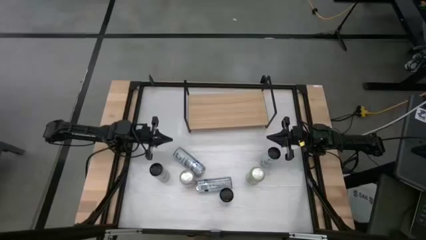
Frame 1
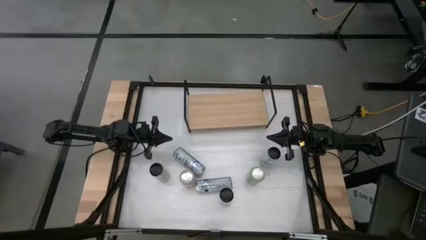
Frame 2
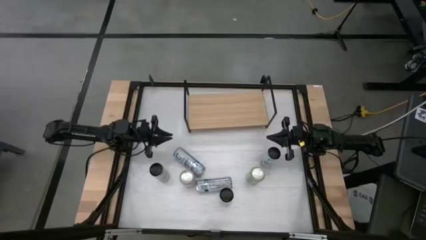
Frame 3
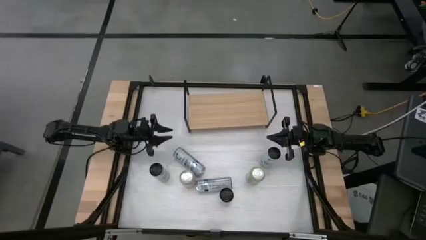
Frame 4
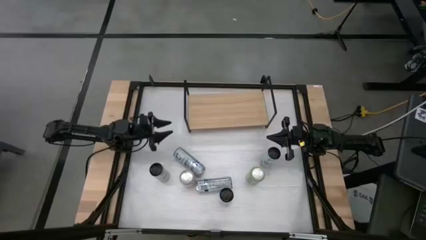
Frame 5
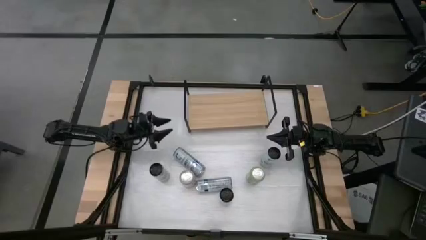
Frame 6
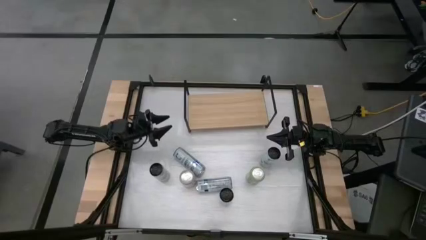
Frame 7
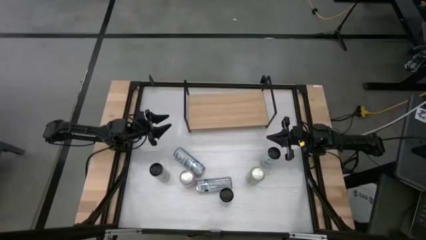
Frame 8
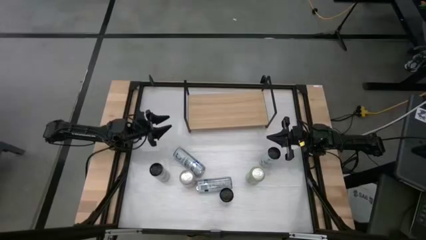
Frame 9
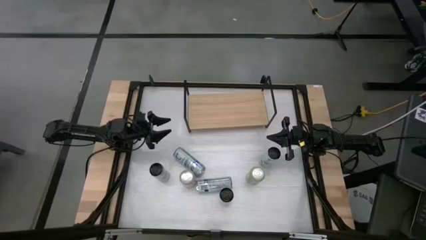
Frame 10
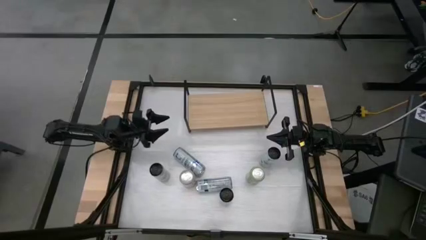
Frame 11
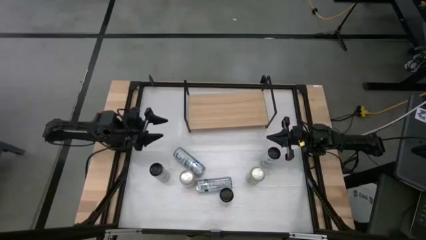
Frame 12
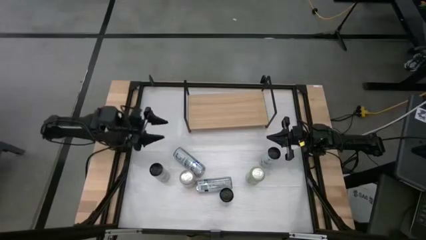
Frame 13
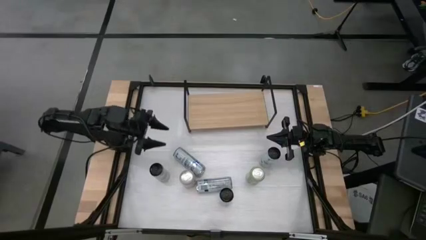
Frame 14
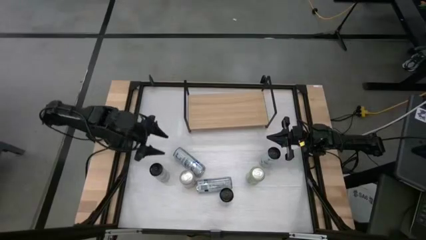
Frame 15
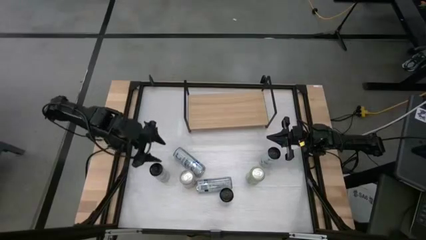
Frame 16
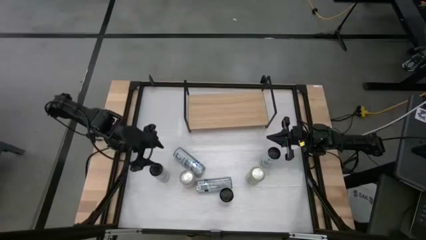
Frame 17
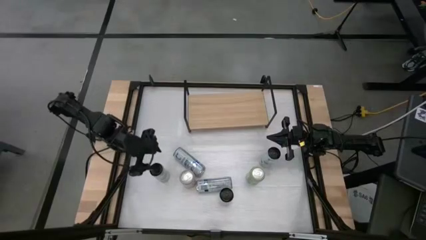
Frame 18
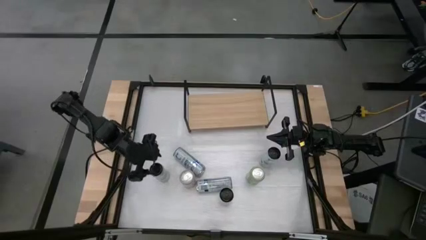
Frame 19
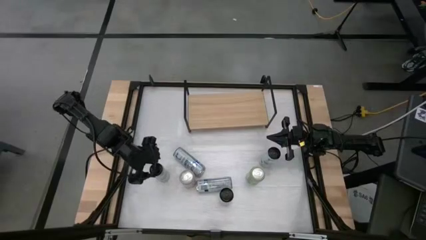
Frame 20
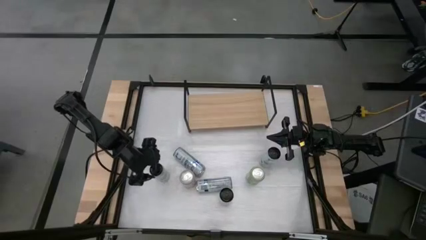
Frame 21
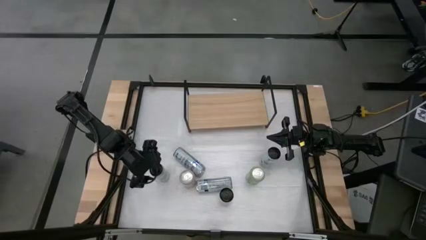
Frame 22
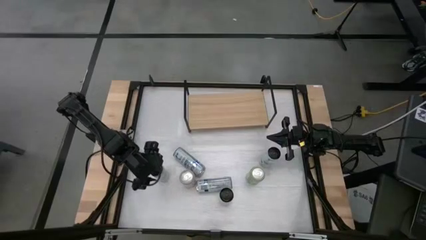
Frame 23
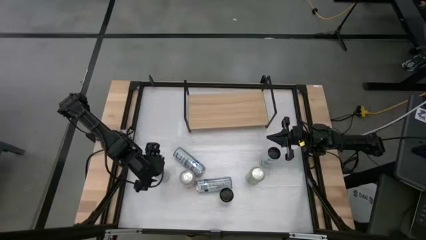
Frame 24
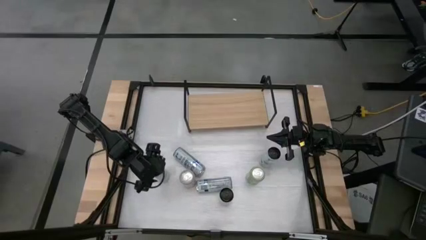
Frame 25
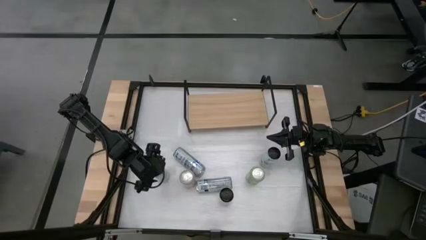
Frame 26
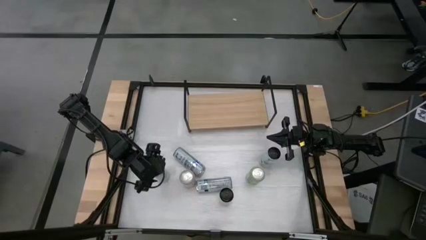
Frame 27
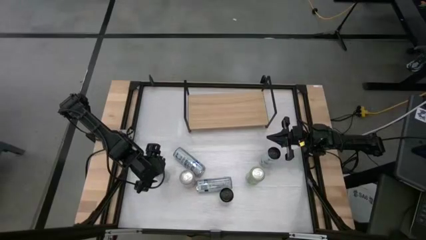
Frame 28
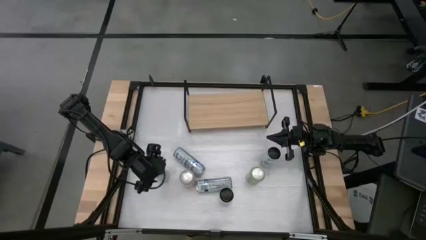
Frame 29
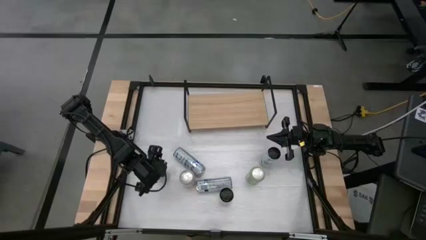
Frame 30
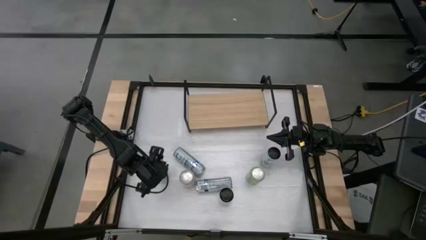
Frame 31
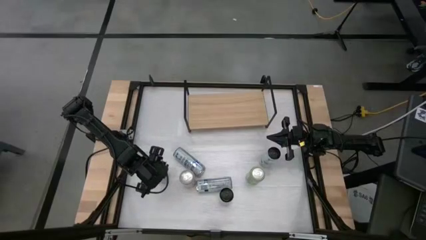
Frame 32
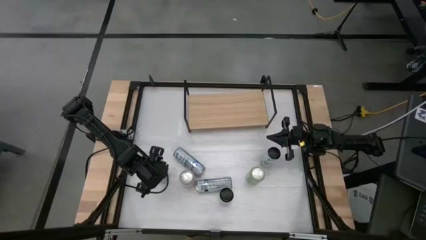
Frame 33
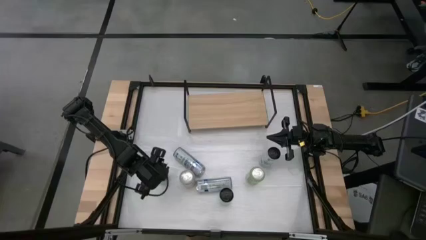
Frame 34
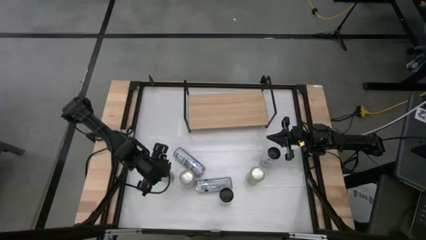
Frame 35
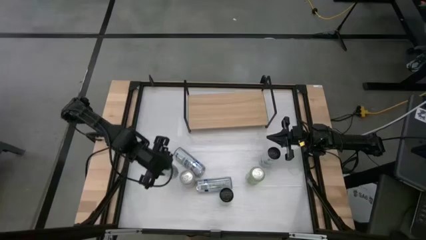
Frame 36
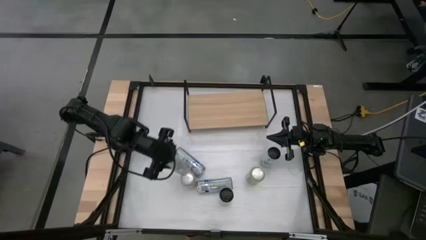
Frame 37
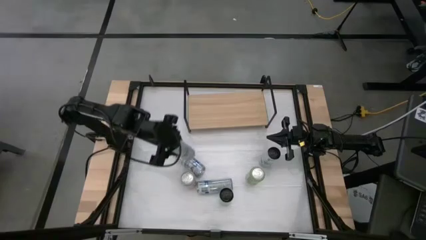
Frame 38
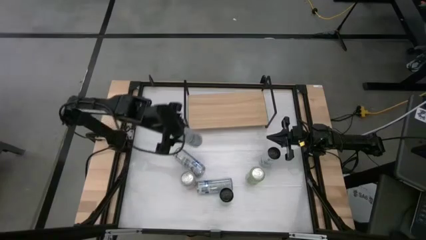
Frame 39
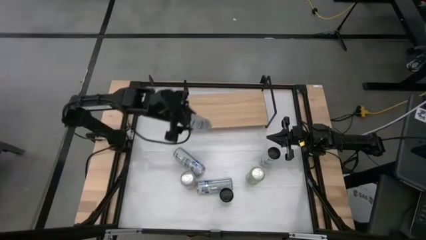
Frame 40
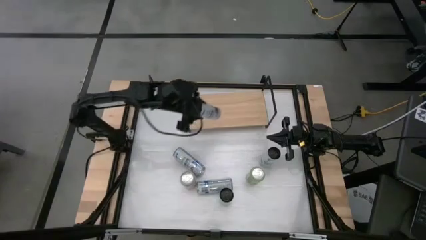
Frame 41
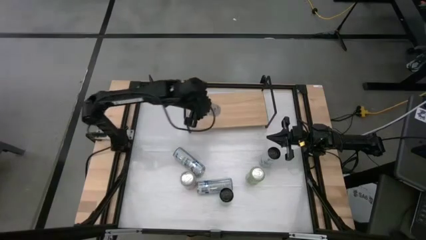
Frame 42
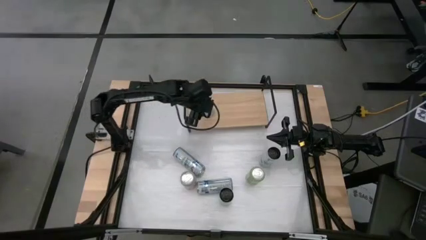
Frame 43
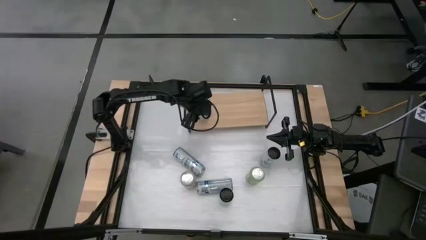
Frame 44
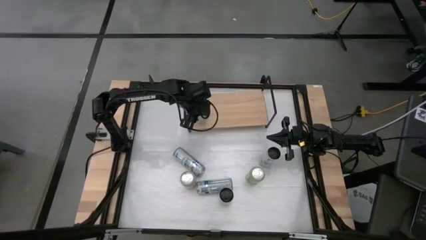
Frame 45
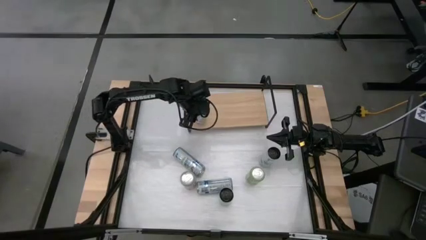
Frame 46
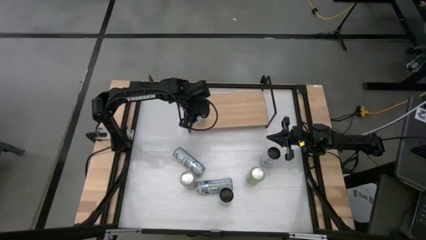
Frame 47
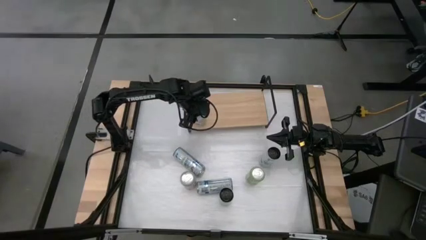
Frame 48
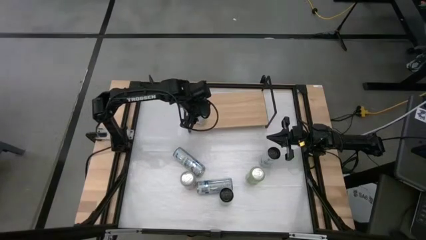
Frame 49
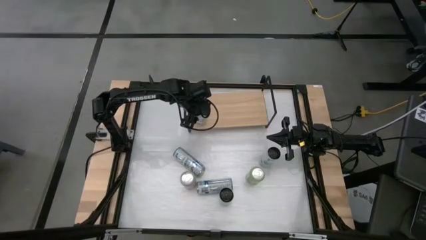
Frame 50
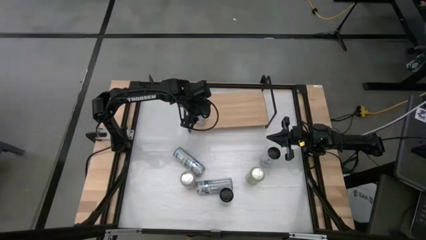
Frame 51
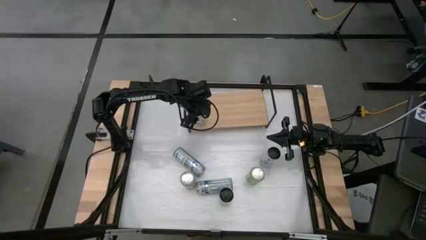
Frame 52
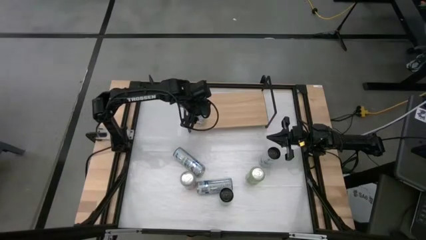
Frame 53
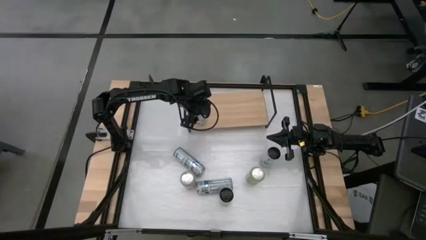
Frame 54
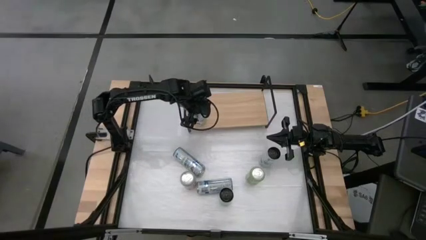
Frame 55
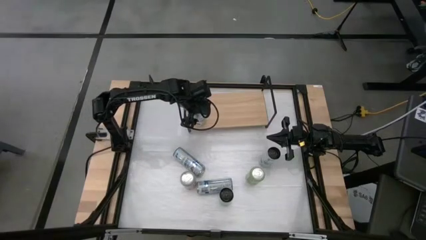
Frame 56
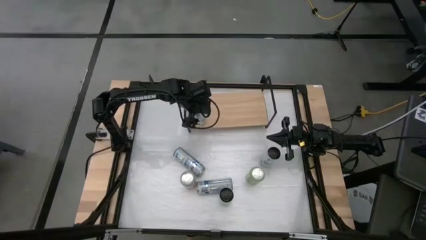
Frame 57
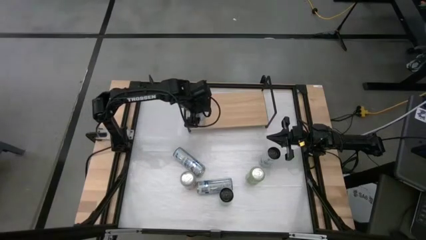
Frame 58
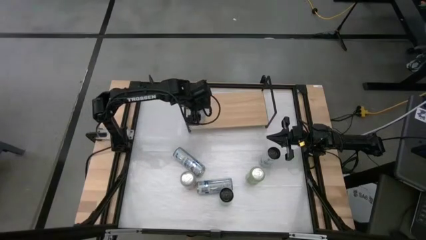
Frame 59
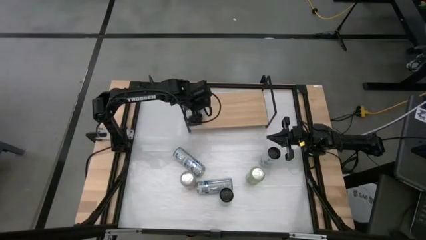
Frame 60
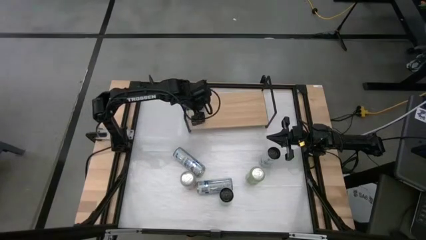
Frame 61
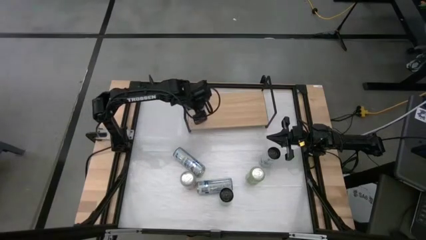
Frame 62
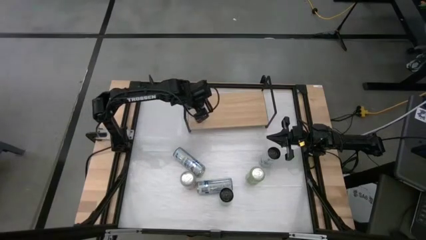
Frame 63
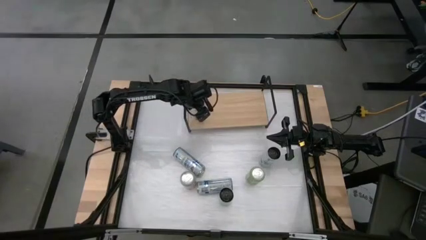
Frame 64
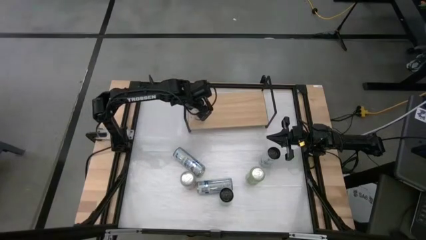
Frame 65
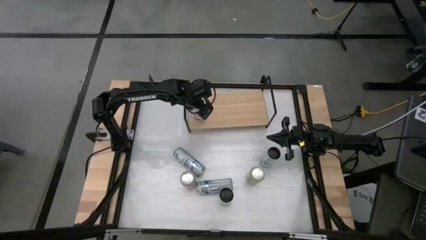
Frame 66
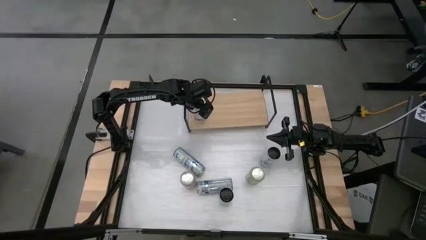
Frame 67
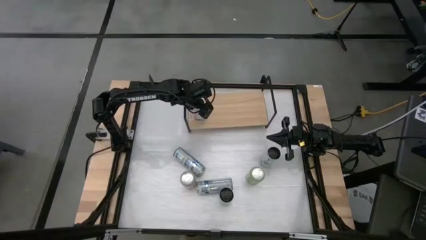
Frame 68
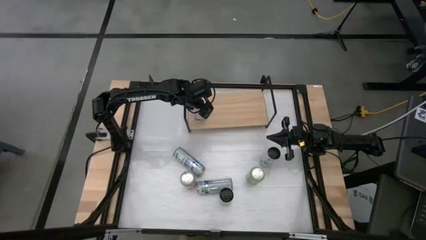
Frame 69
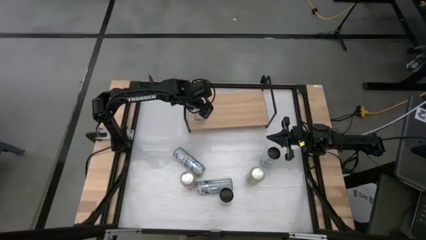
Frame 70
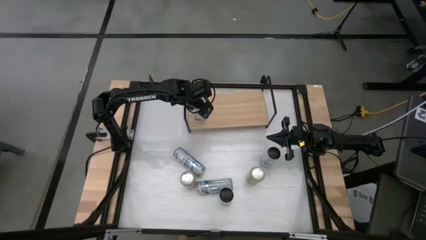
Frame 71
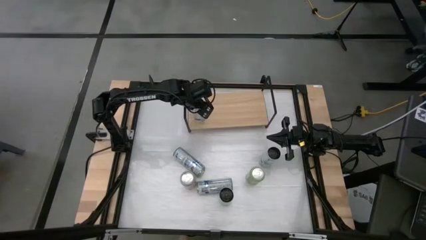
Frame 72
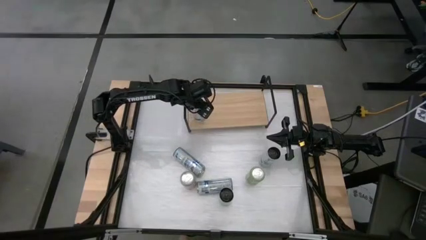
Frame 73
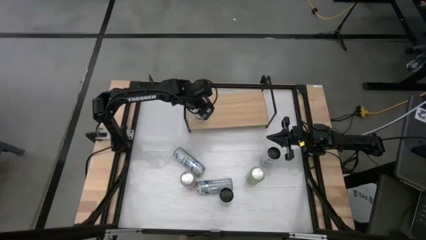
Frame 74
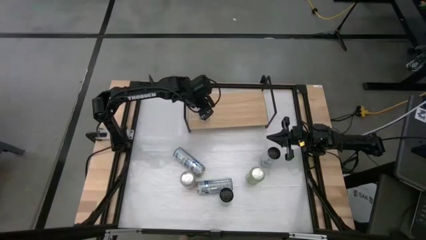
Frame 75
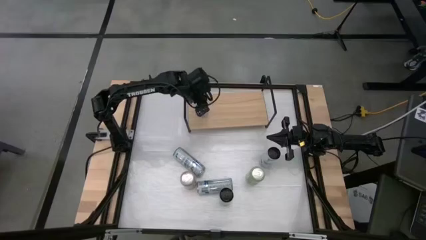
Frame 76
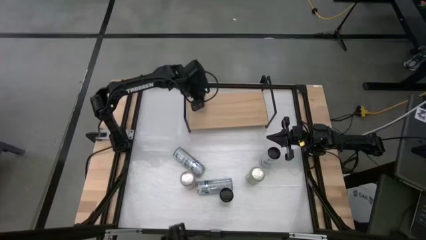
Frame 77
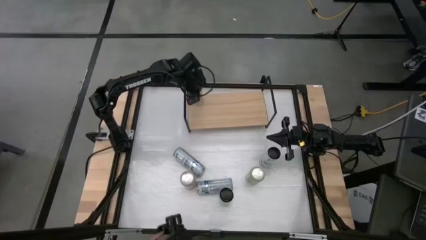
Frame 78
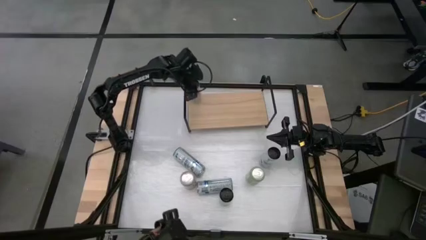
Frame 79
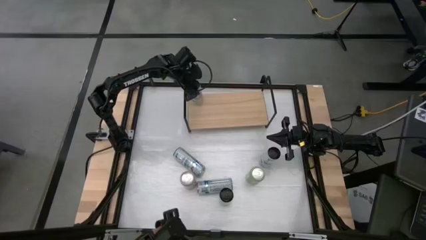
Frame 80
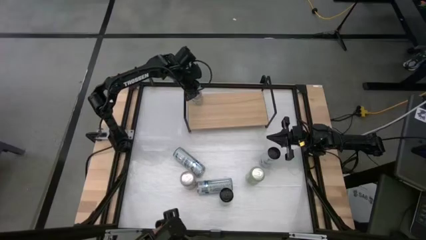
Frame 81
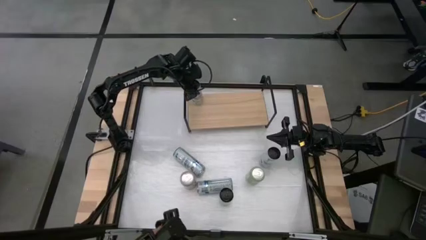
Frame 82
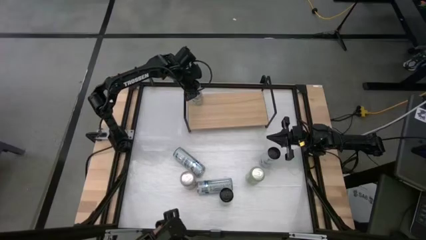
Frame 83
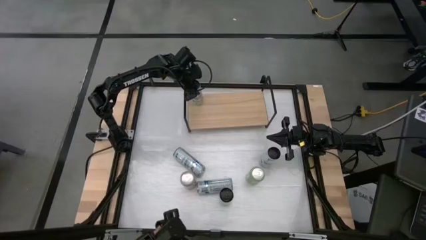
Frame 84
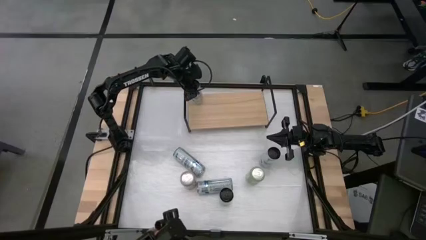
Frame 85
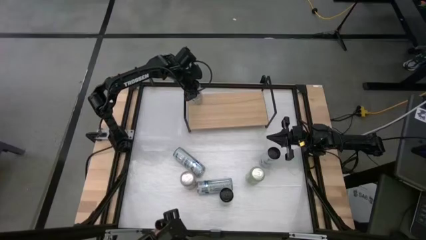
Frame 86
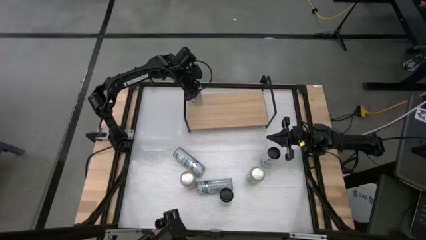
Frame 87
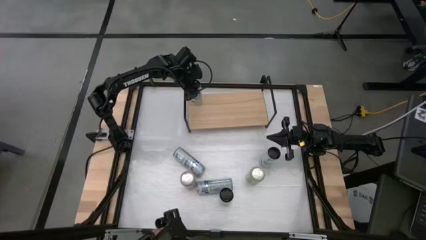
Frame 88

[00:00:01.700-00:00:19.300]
Task: Place canned beverage on shelf
Put the white-blue soda can on the shelf
